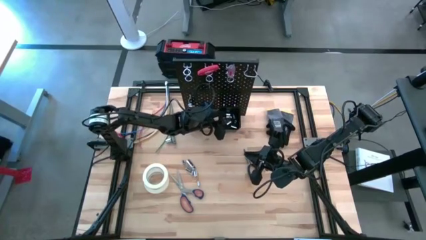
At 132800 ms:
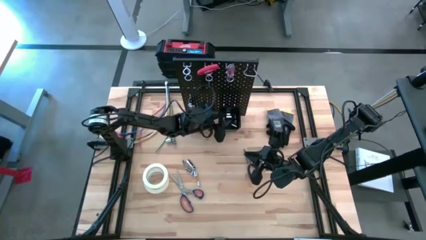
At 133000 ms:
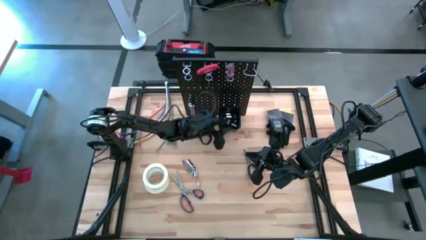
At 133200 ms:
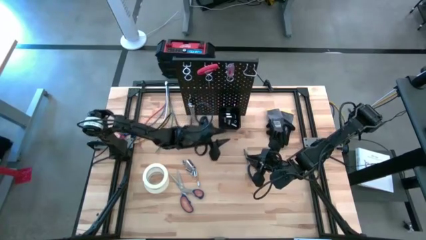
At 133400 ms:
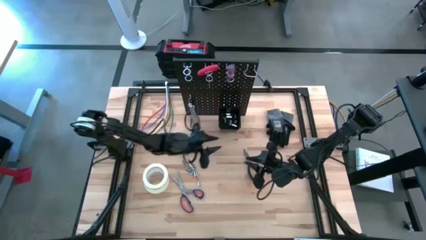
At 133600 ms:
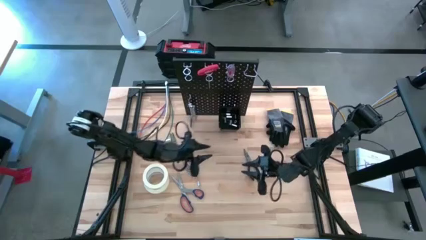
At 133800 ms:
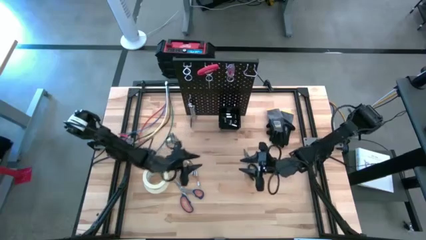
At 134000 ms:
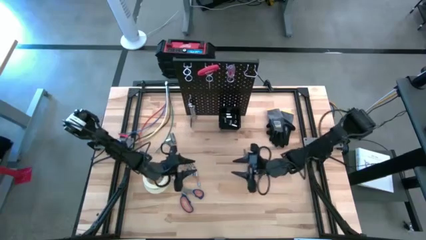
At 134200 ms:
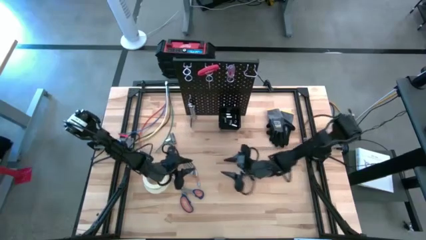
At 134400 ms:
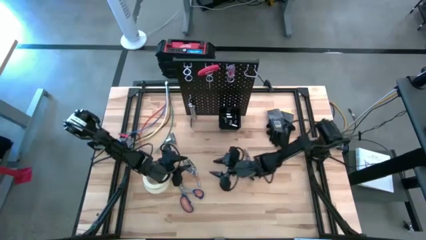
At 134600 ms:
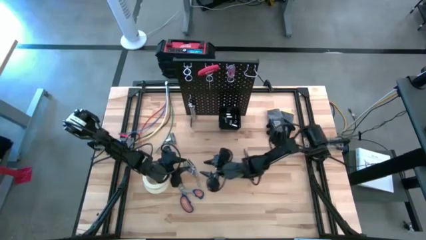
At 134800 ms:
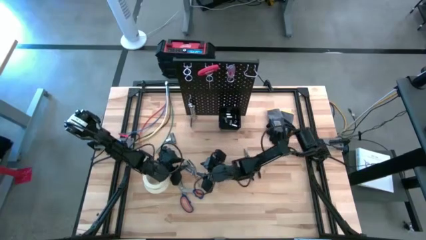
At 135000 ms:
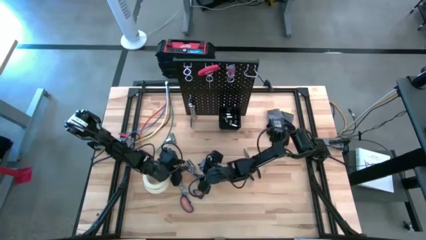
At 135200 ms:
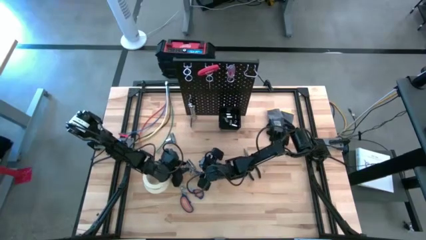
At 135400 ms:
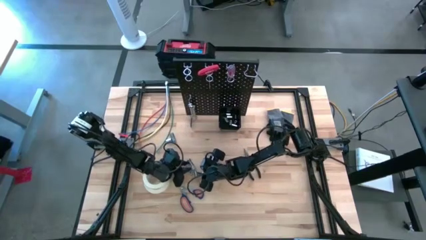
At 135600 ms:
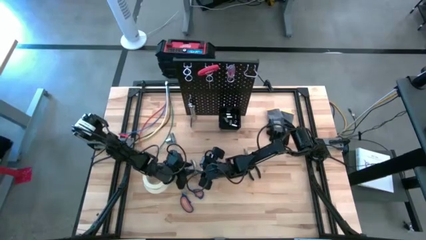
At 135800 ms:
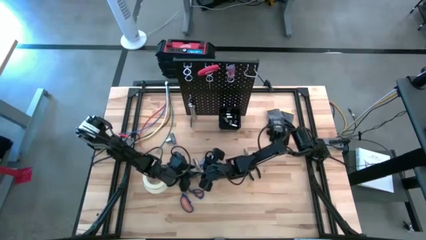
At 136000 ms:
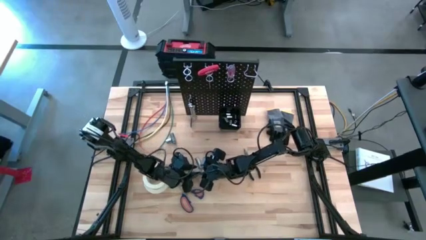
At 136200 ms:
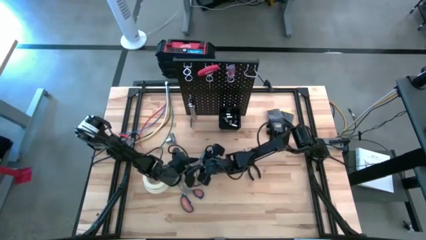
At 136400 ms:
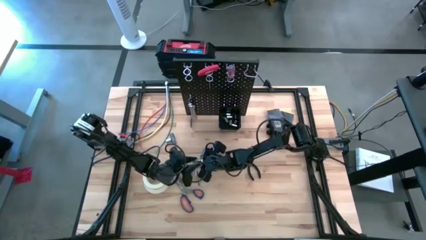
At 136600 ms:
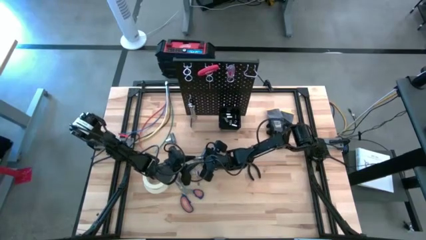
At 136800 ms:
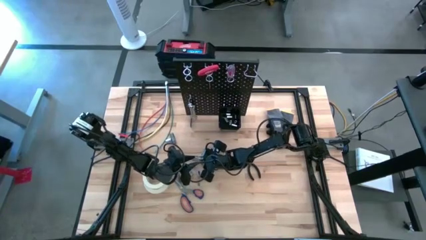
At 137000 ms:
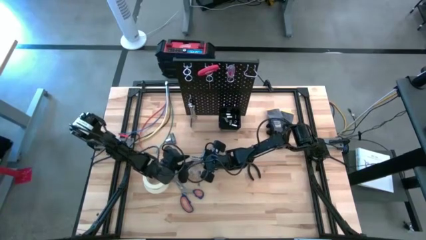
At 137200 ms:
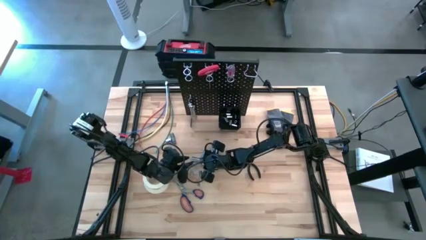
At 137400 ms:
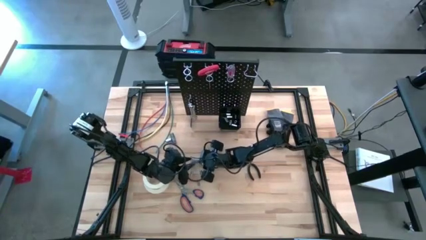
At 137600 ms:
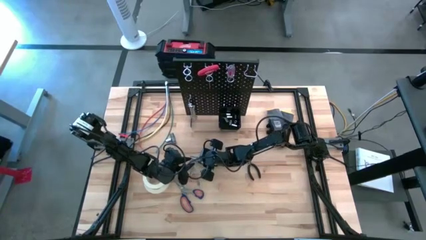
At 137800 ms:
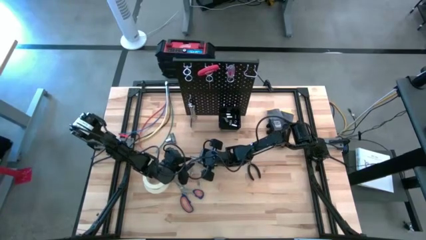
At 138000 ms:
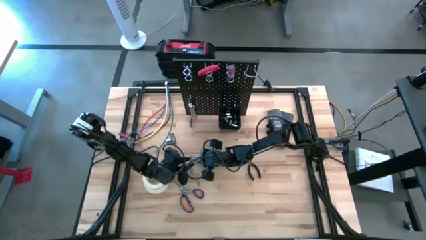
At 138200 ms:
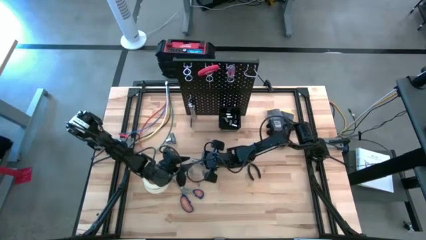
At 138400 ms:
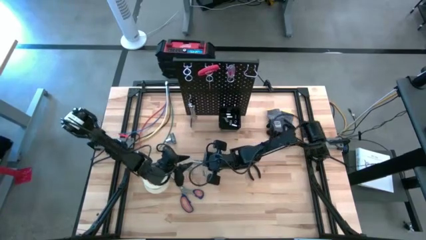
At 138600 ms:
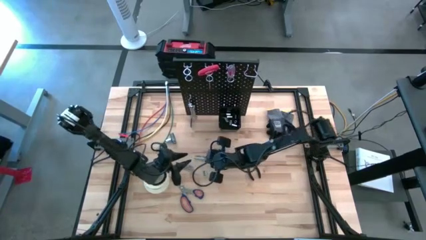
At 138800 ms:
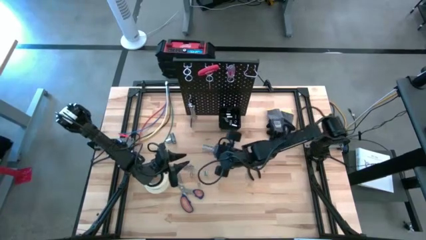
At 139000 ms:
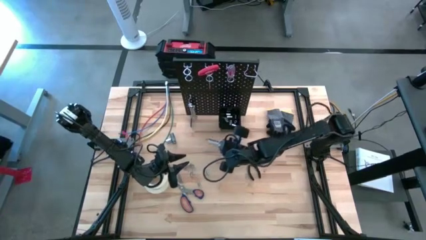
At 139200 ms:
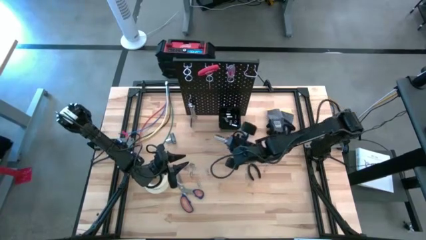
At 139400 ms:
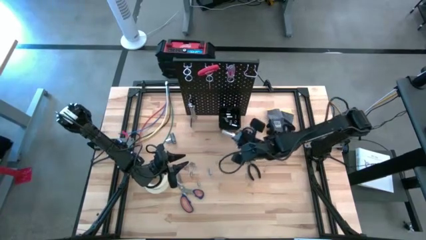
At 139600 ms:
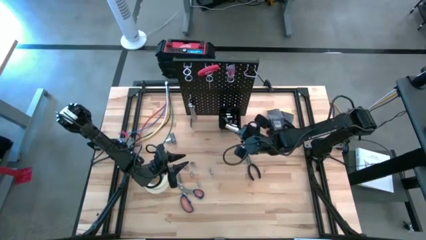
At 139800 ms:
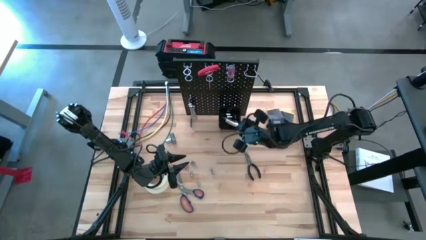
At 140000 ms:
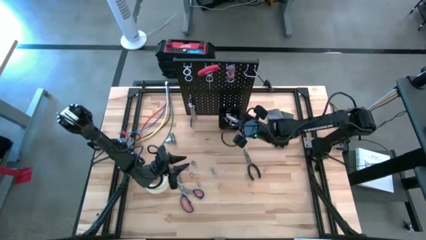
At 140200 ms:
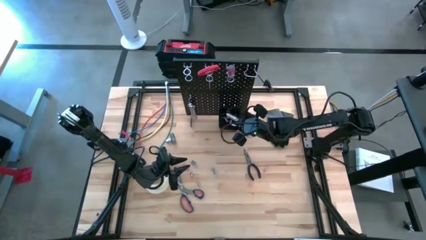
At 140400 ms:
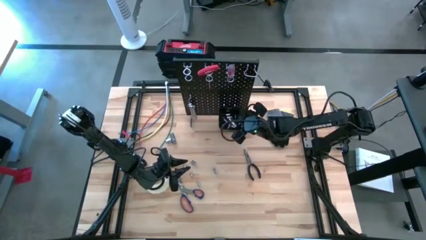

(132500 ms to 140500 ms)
Task: Hang tools onto peg board
Put the extension bar into the black bin on the peg board

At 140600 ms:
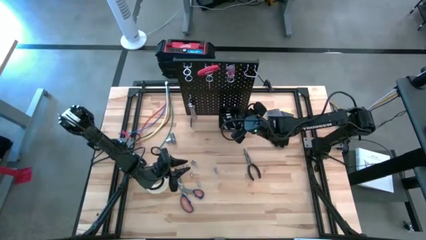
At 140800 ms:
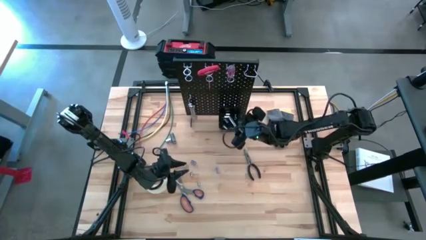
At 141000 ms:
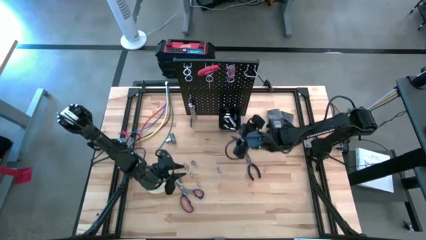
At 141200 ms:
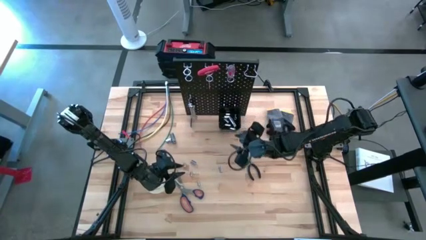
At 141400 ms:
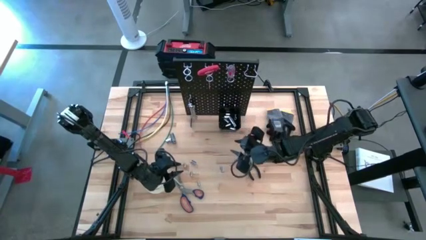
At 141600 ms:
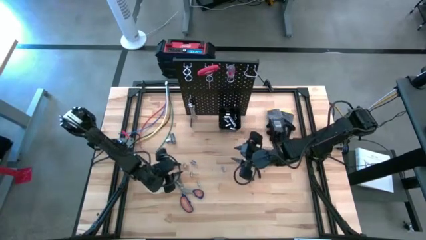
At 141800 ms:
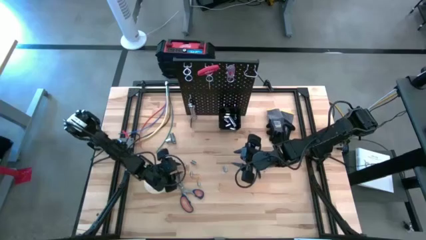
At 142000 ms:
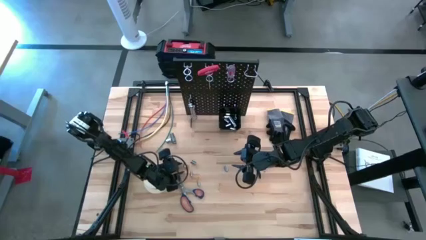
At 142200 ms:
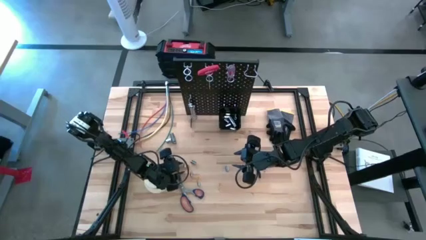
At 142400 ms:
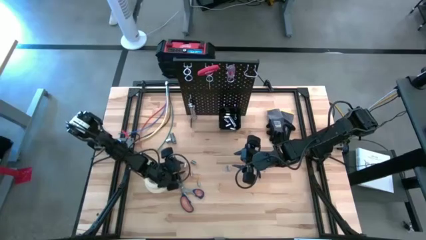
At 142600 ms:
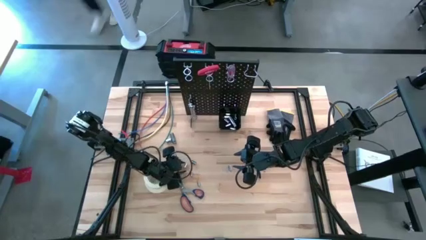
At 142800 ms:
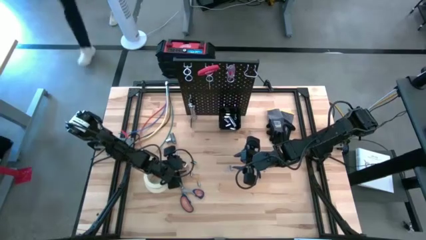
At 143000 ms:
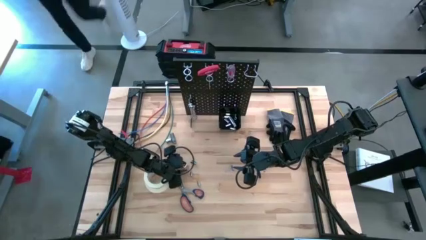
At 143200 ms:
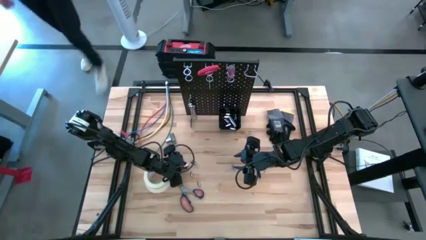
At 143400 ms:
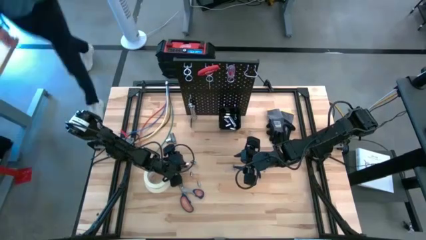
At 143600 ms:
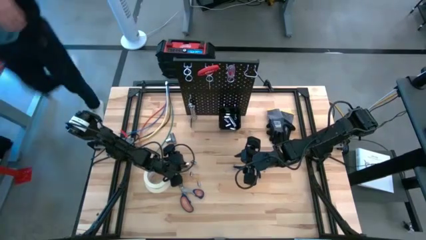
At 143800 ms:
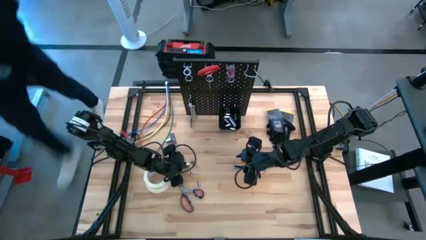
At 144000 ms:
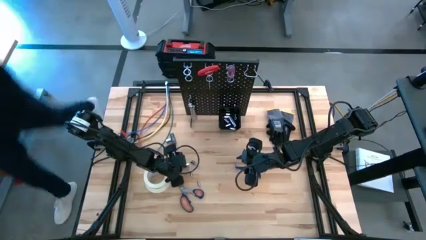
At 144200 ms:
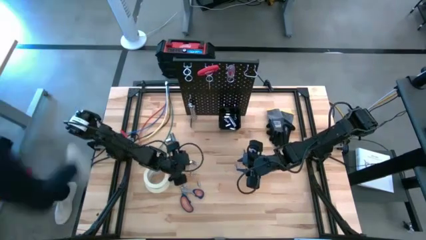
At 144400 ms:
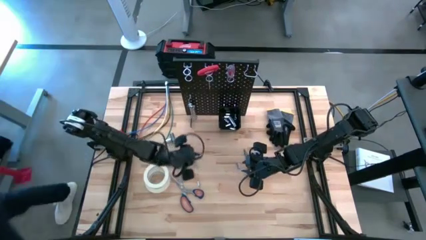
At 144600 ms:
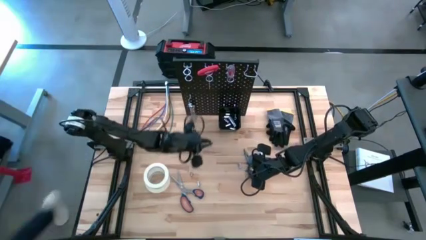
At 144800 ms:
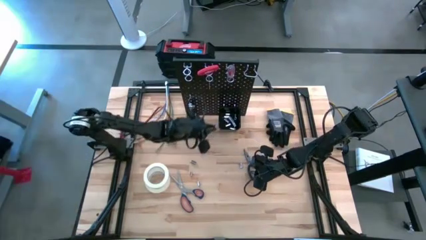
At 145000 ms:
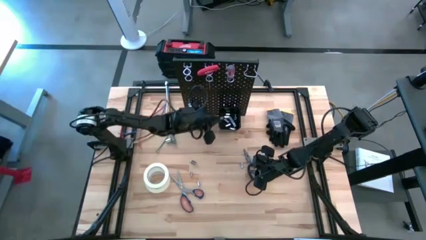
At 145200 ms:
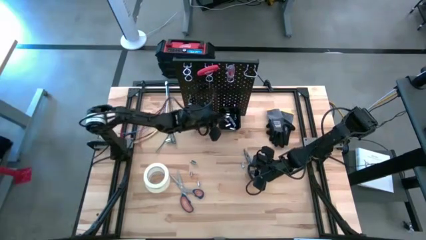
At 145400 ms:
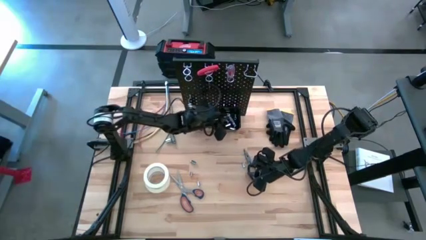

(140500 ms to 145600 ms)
Put the socket into the black bin on the peg board

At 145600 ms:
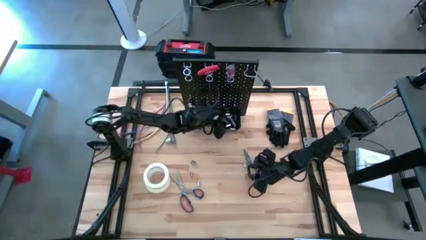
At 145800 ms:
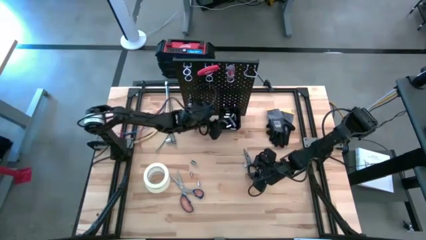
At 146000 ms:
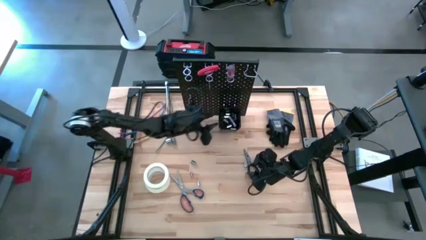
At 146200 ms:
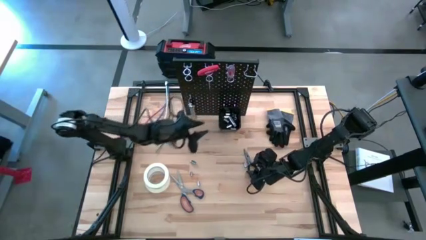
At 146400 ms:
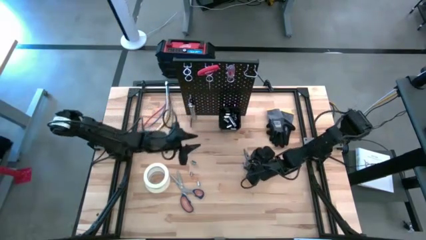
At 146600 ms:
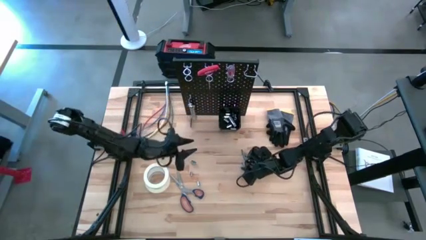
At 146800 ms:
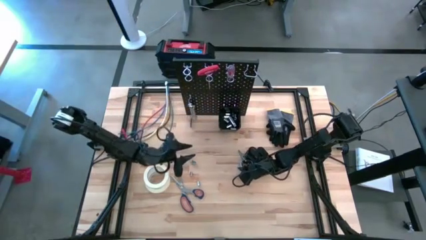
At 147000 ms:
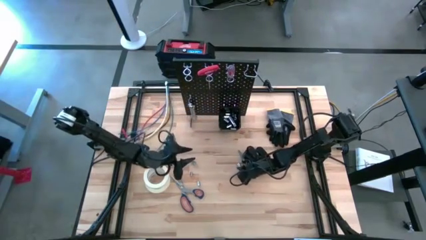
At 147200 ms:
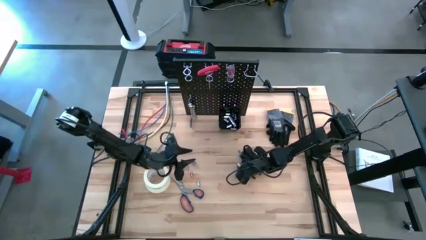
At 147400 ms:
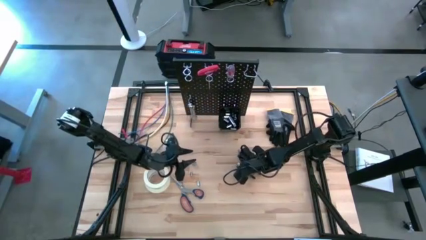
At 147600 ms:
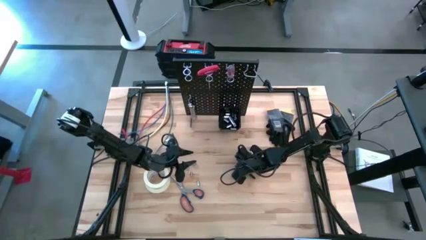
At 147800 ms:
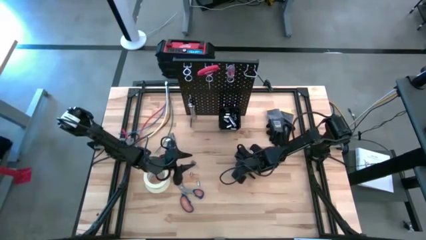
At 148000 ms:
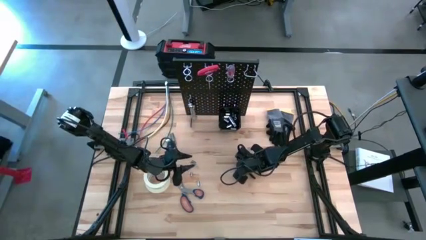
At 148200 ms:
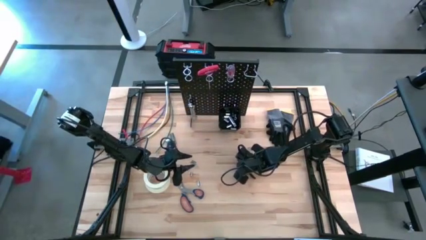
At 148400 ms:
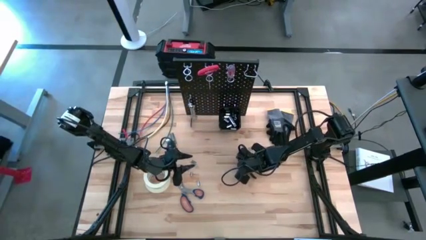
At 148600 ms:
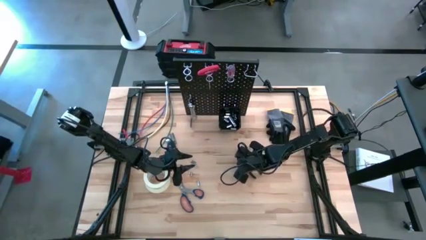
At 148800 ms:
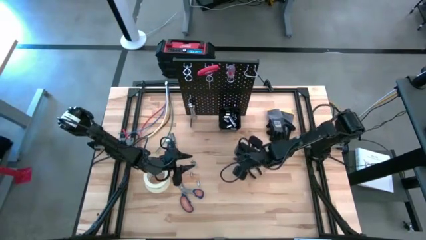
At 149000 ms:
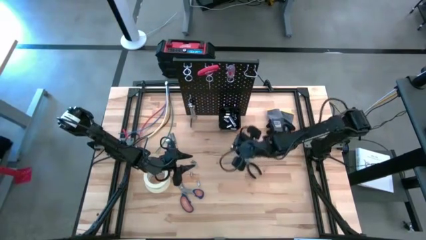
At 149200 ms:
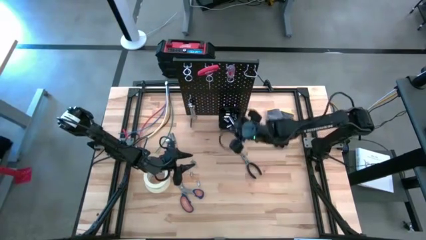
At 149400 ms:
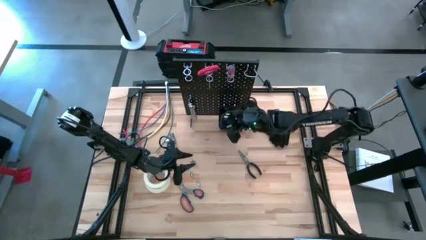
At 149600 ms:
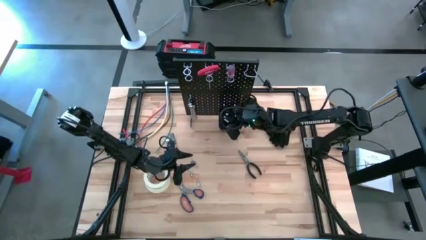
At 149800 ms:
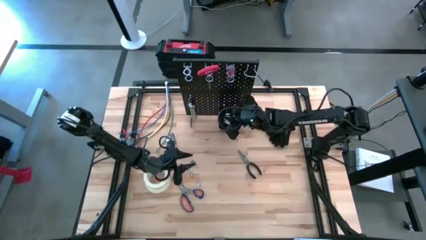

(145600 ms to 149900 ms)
Put the socket into the black bin on the peg board
